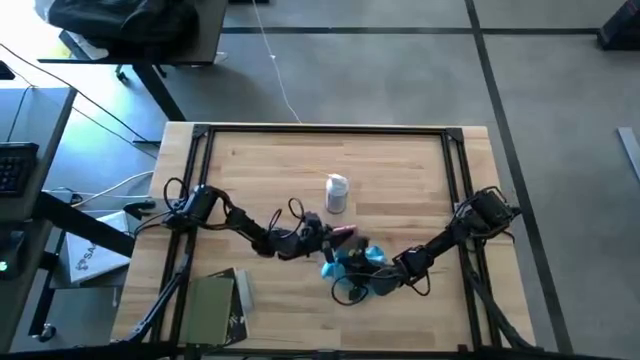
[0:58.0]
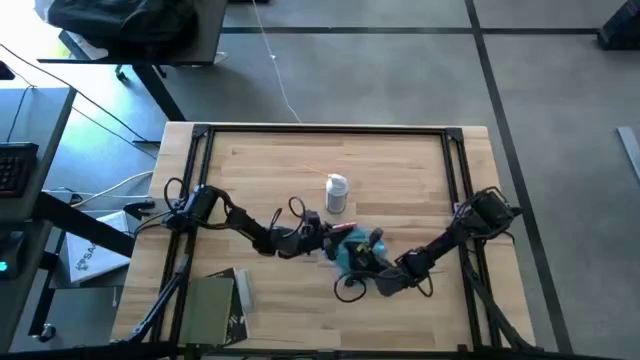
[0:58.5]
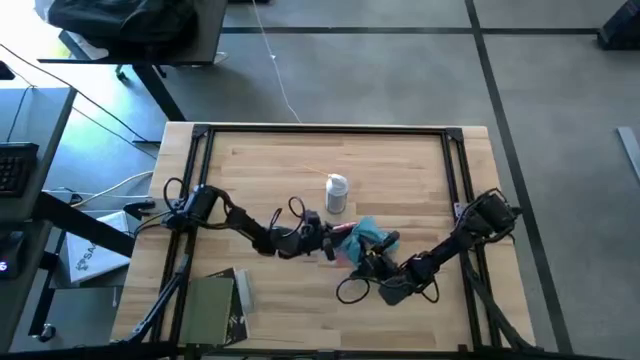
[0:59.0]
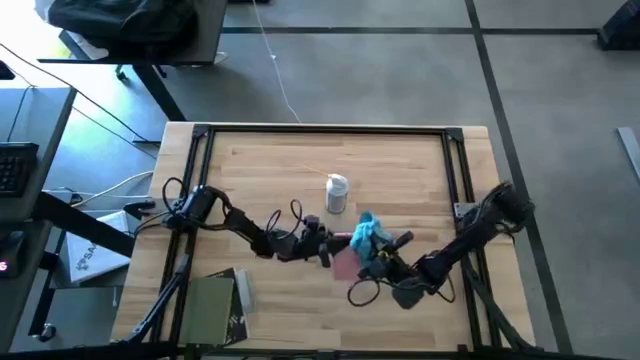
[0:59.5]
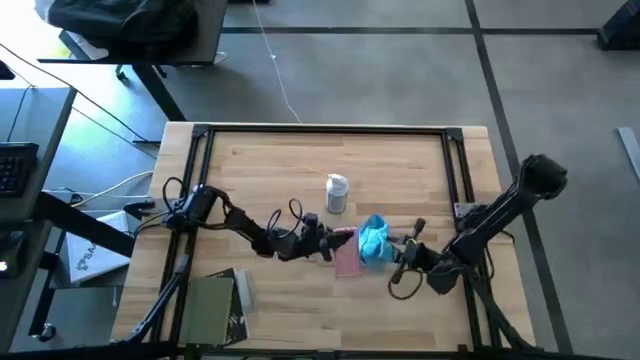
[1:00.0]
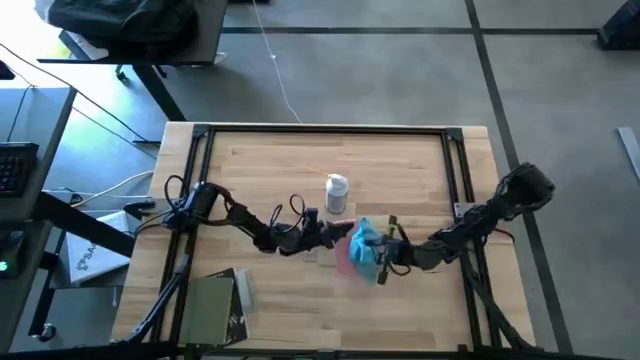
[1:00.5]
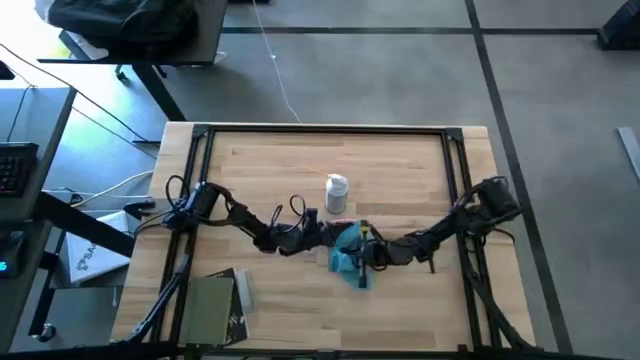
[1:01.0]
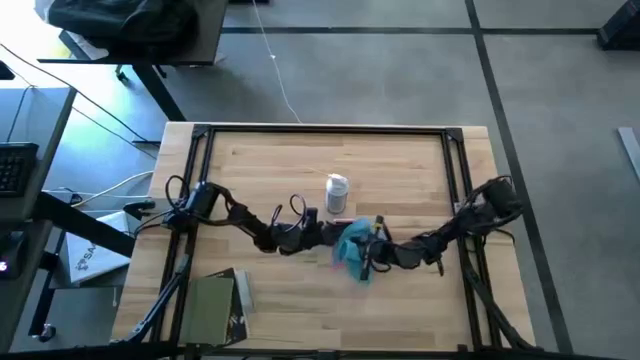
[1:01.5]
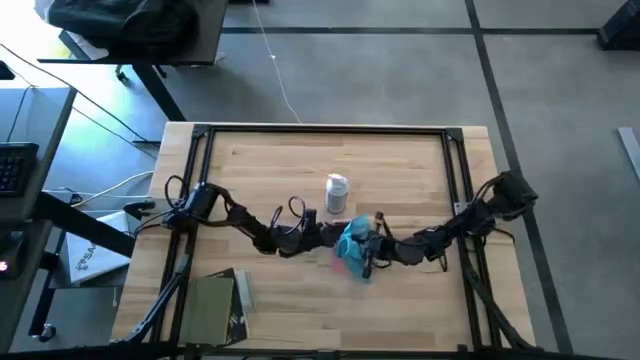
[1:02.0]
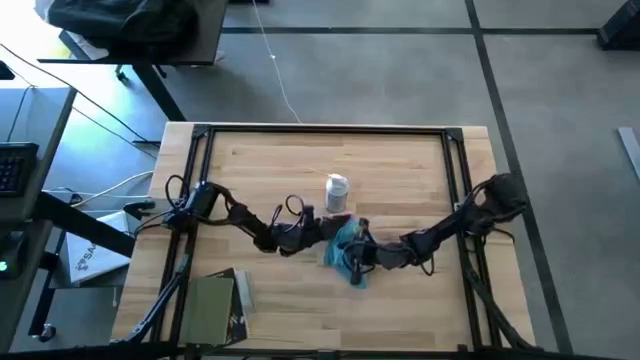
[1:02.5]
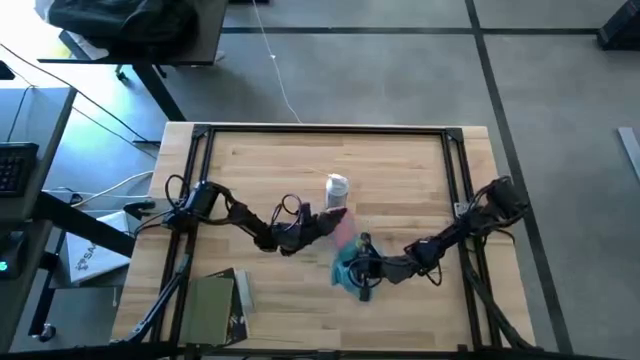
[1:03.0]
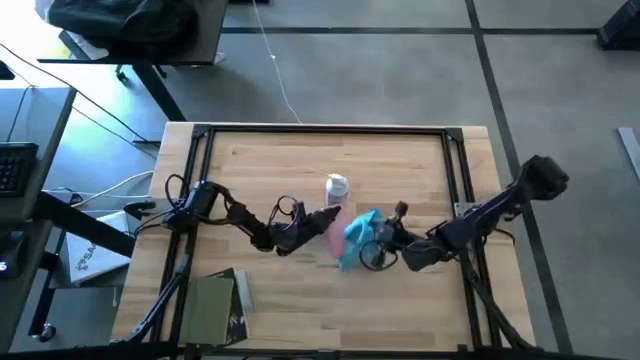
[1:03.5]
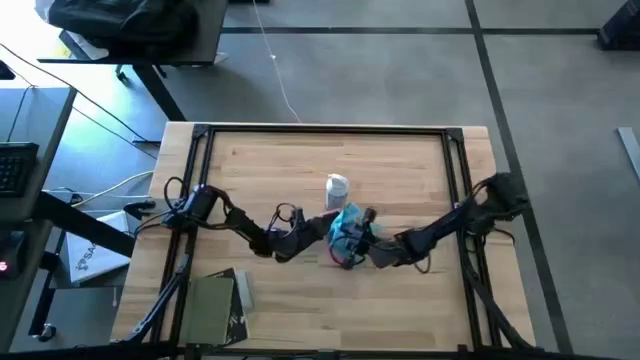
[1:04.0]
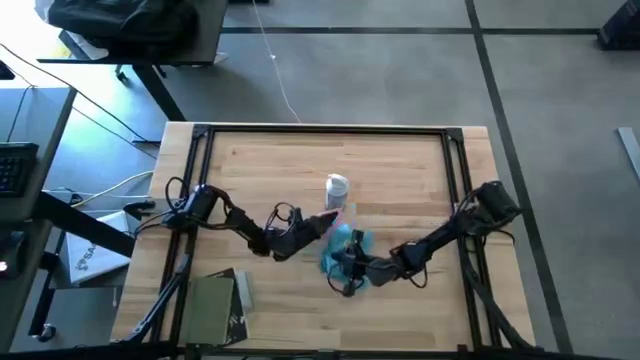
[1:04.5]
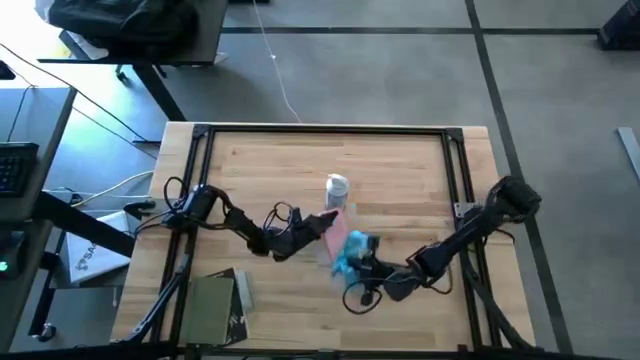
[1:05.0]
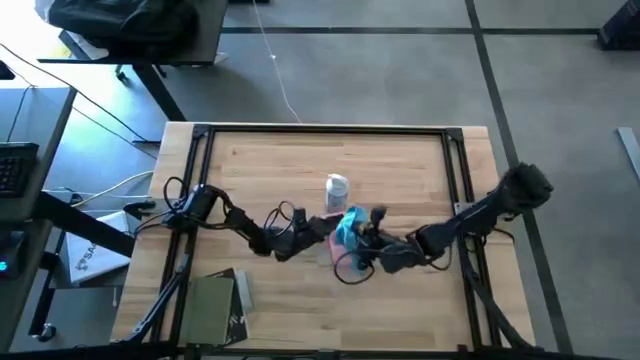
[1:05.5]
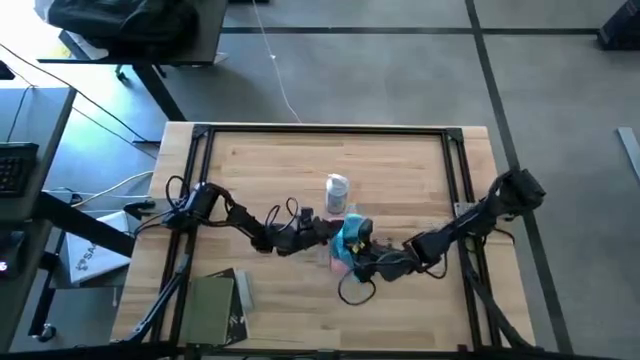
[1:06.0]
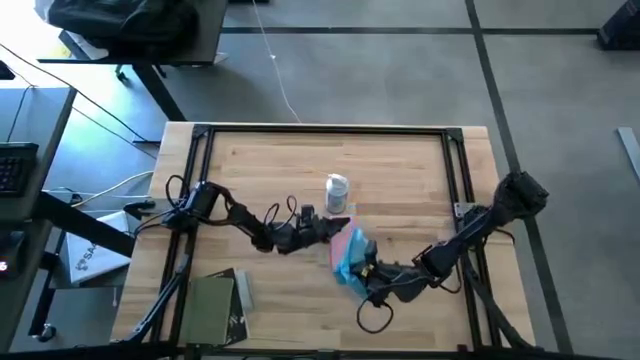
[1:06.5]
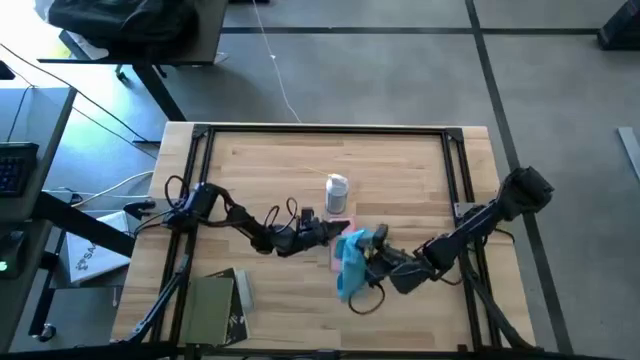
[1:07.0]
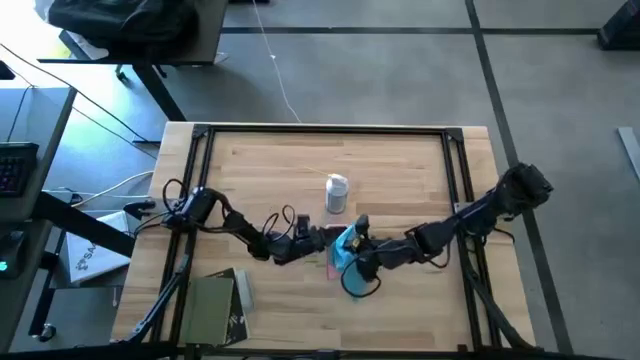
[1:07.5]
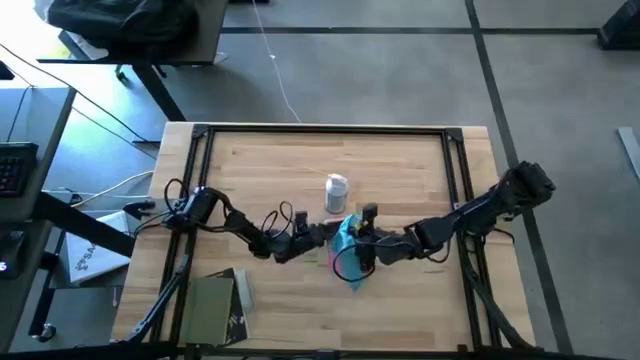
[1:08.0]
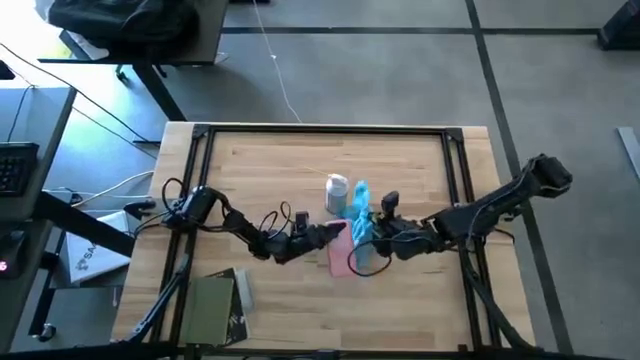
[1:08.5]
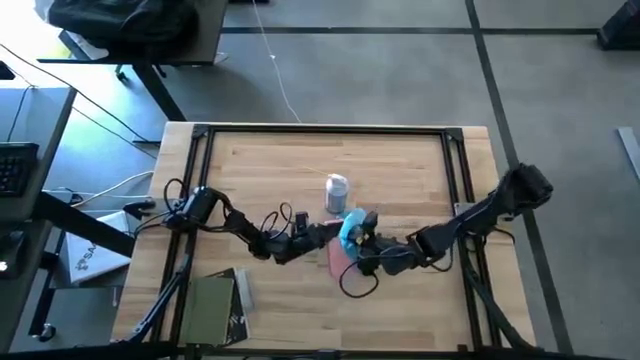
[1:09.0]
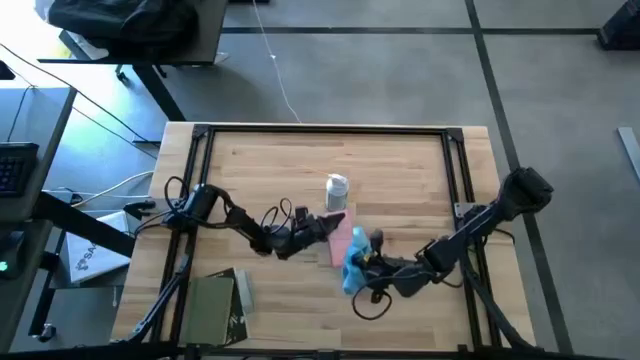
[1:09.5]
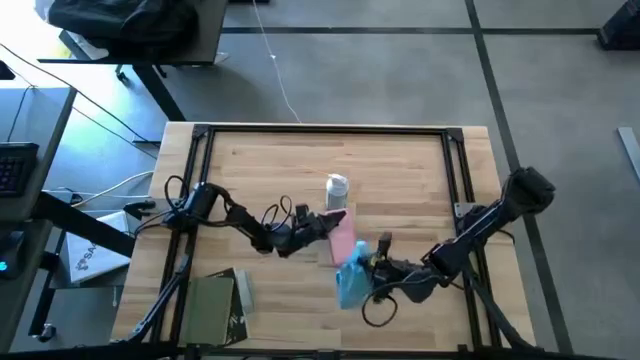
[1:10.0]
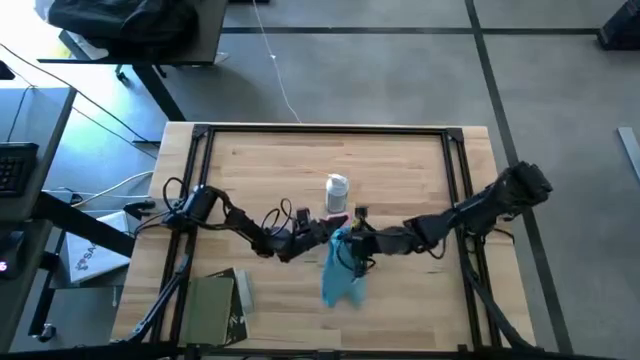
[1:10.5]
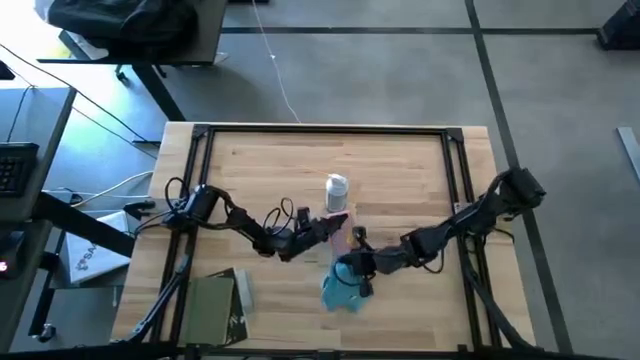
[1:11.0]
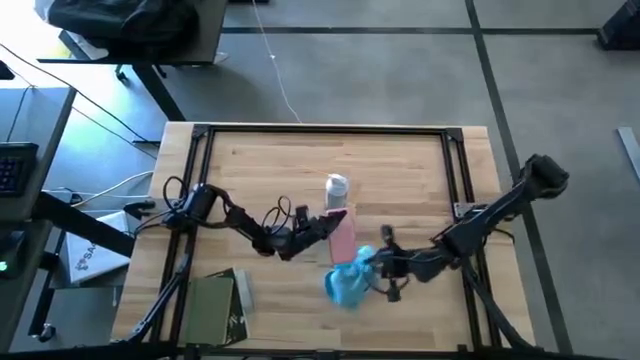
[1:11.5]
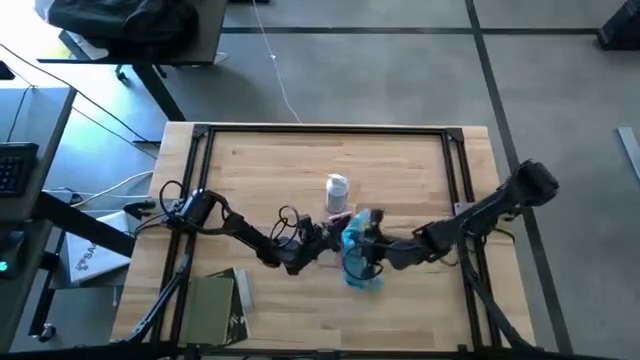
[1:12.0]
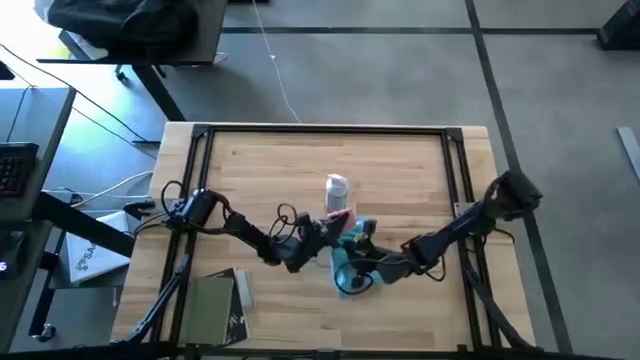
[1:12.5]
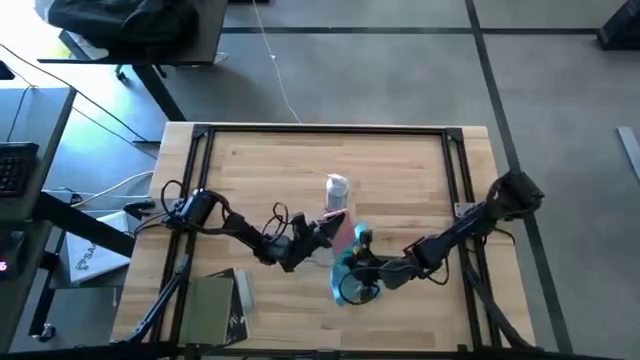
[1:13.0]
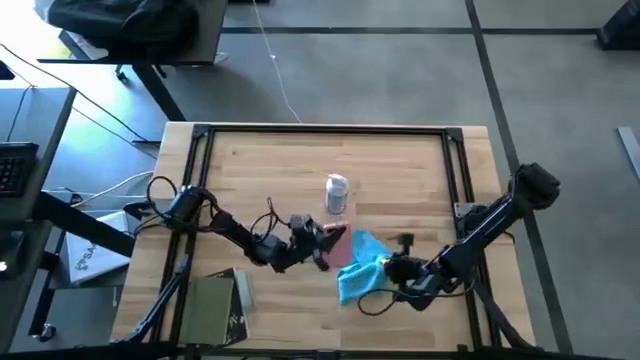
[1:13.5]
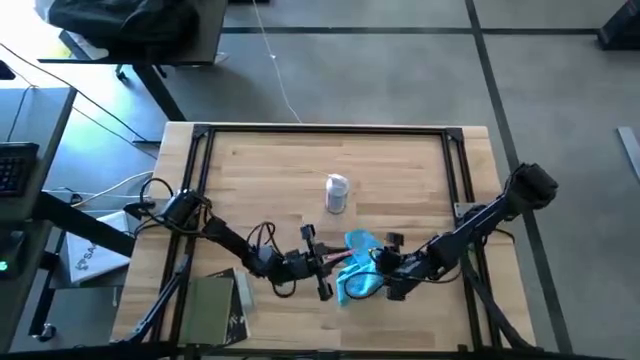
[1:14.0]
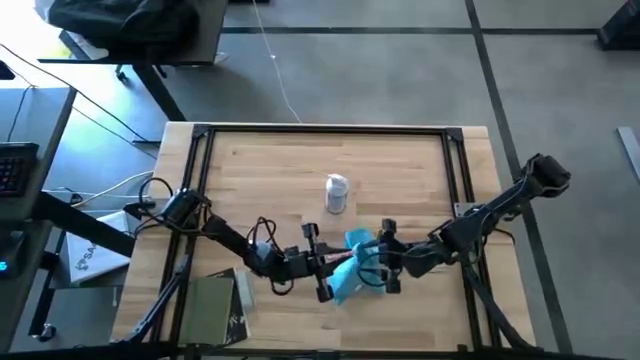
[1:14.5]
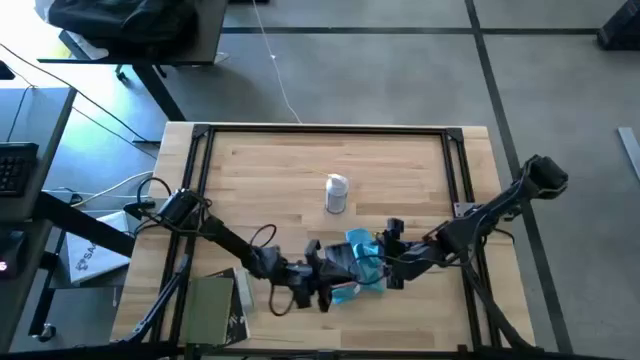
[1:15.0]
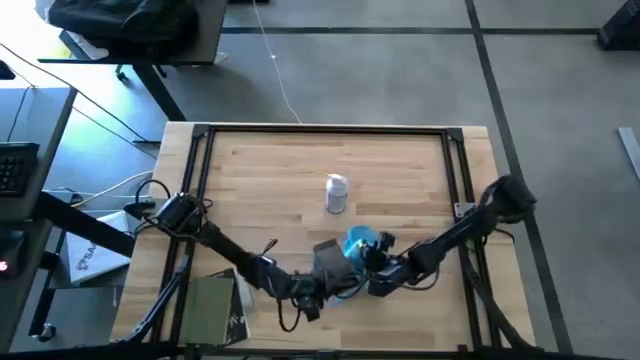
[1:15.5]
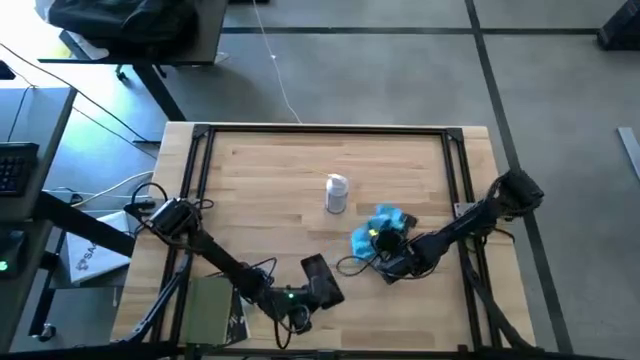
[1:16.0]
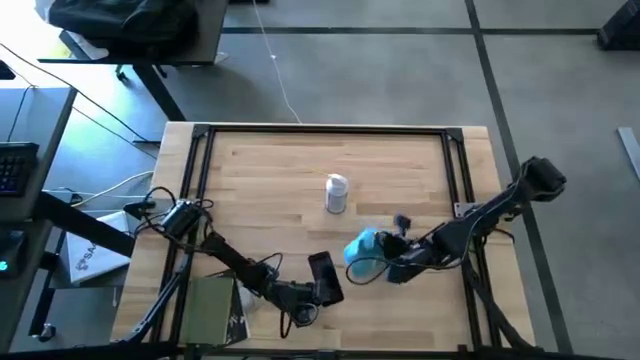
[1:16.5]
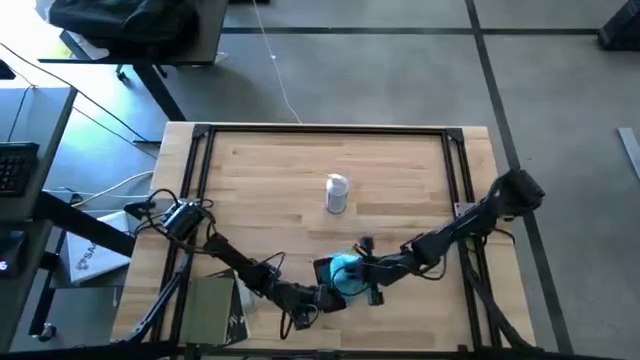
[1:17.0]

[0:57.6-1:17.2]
Task: Apply microfiber cloth
Wipe the pink cellphone with a blue microfiber cloth
